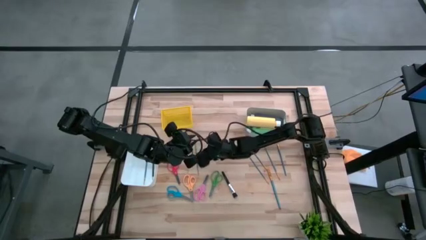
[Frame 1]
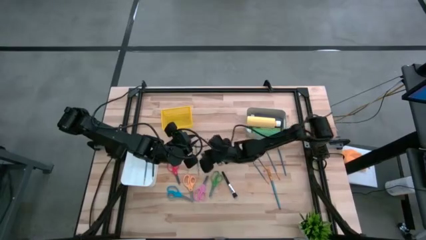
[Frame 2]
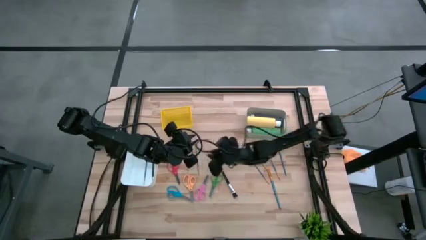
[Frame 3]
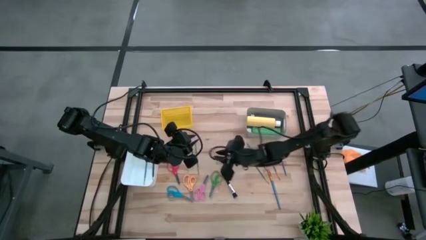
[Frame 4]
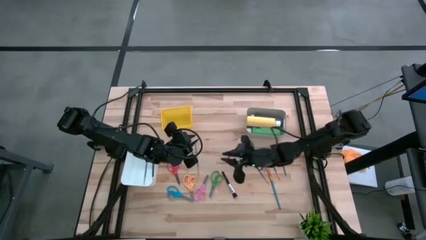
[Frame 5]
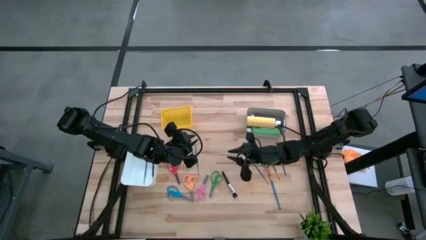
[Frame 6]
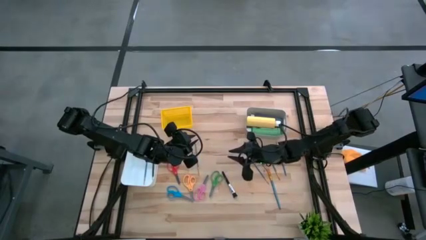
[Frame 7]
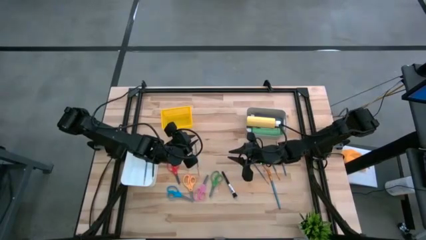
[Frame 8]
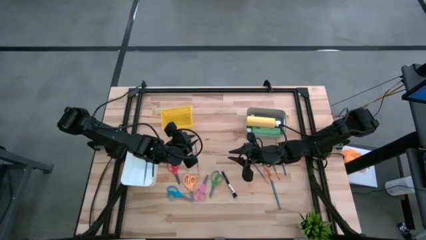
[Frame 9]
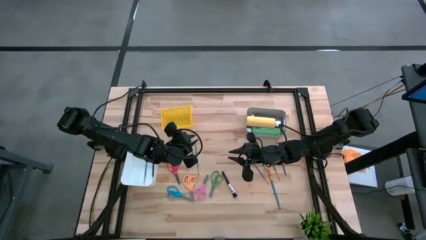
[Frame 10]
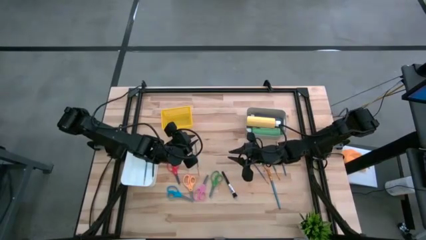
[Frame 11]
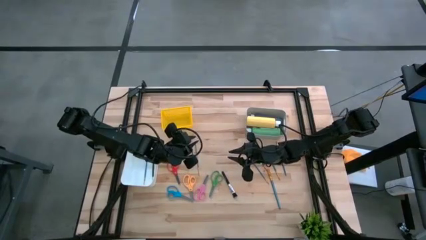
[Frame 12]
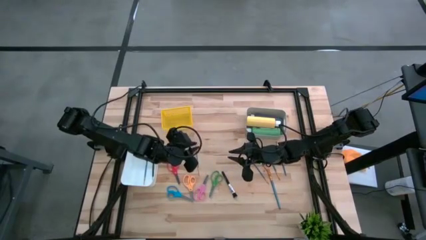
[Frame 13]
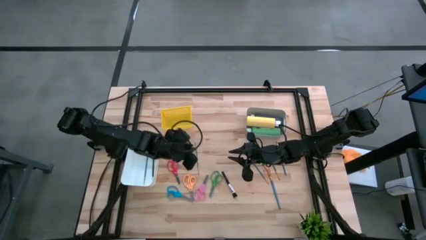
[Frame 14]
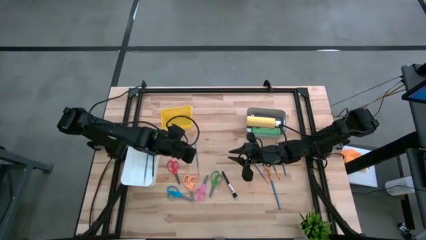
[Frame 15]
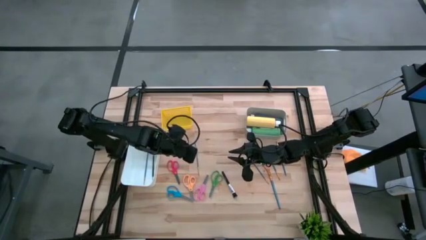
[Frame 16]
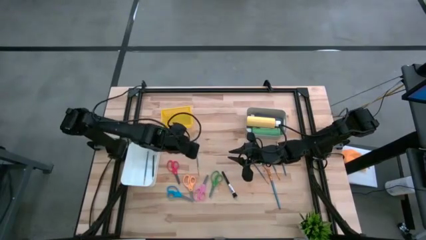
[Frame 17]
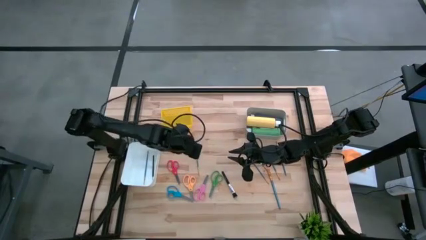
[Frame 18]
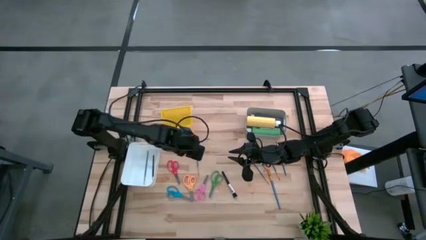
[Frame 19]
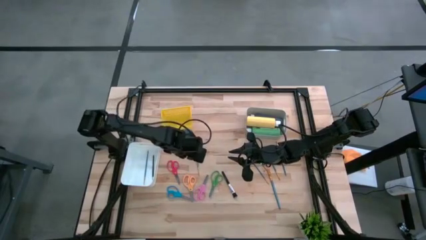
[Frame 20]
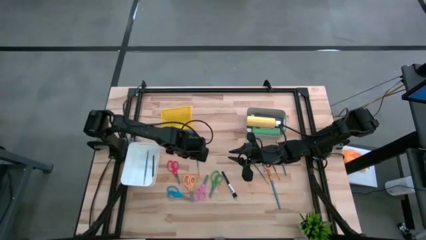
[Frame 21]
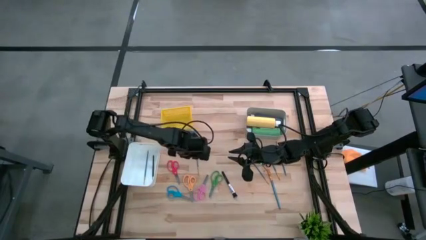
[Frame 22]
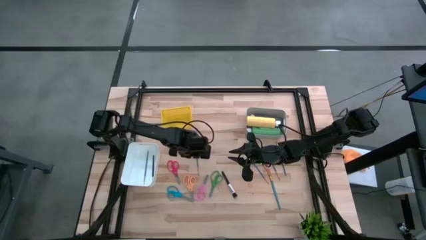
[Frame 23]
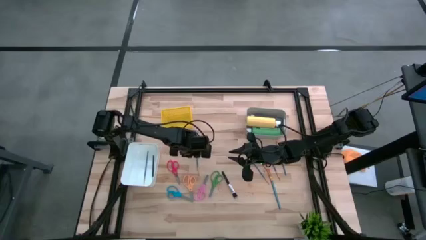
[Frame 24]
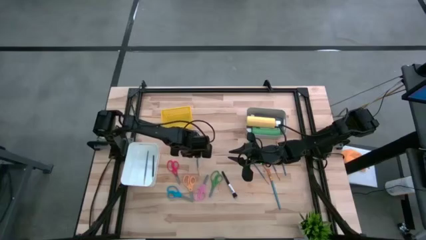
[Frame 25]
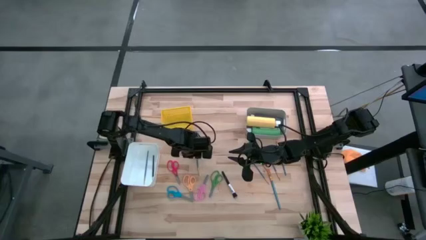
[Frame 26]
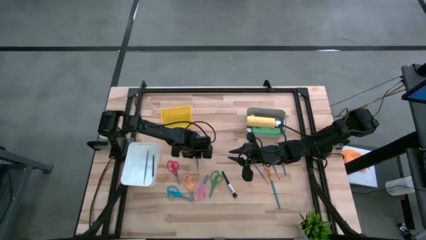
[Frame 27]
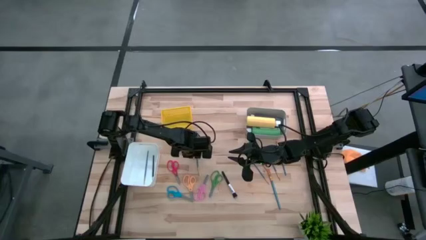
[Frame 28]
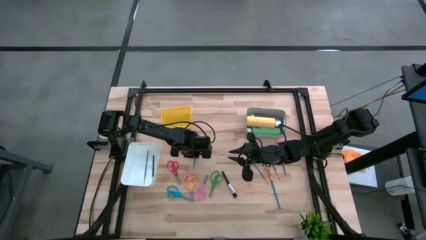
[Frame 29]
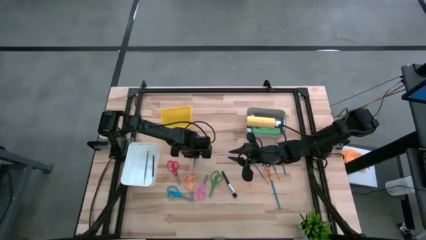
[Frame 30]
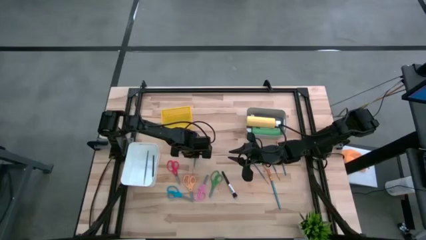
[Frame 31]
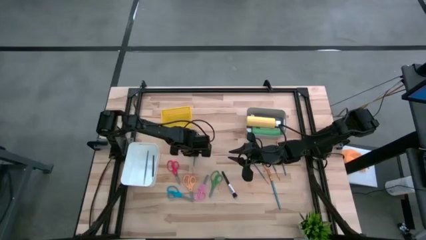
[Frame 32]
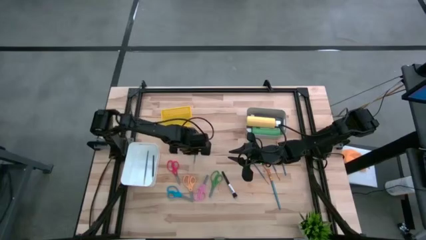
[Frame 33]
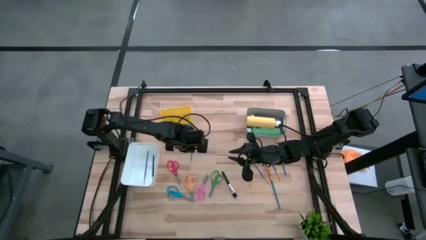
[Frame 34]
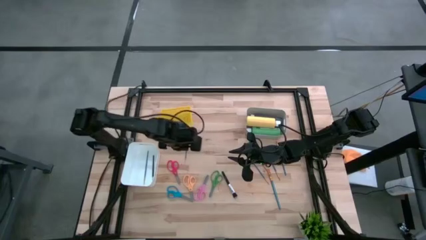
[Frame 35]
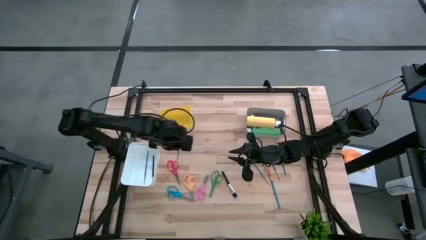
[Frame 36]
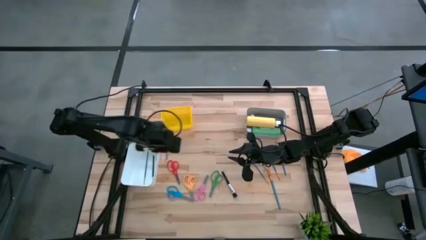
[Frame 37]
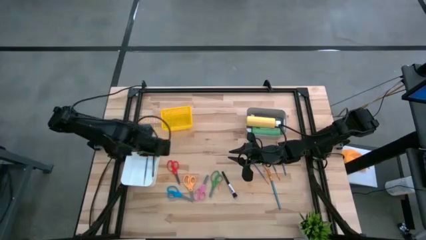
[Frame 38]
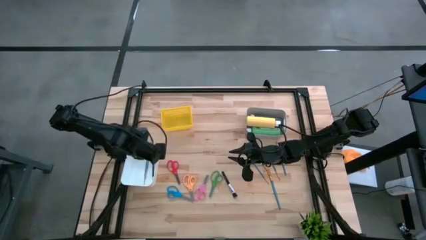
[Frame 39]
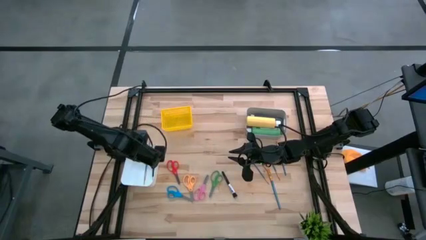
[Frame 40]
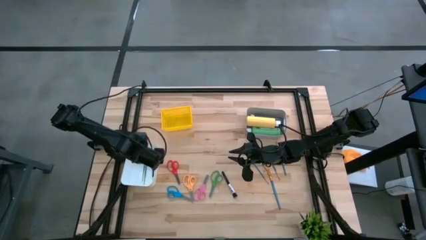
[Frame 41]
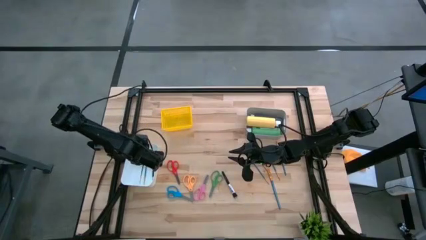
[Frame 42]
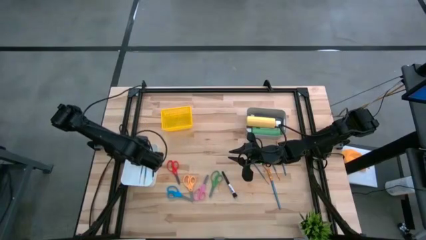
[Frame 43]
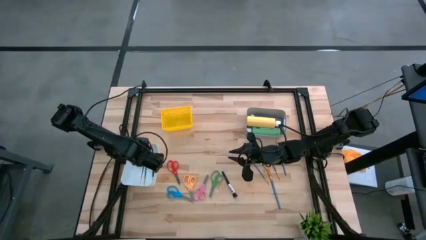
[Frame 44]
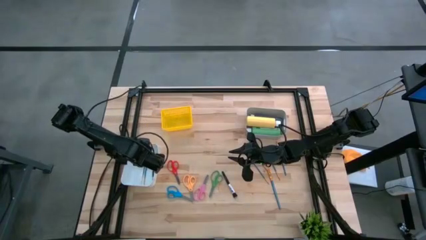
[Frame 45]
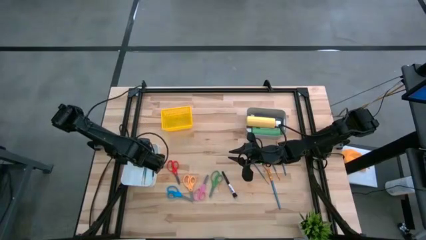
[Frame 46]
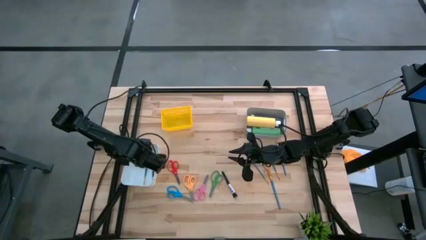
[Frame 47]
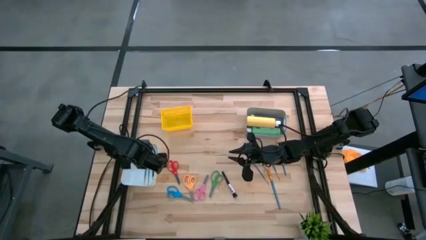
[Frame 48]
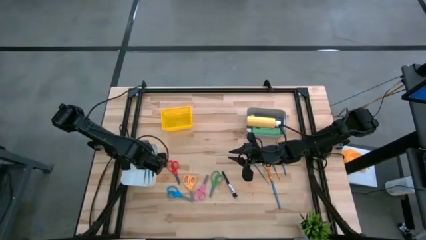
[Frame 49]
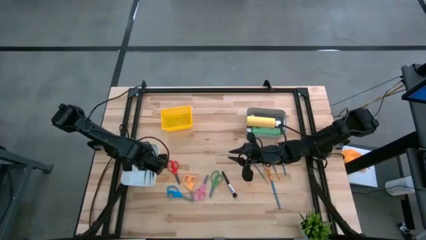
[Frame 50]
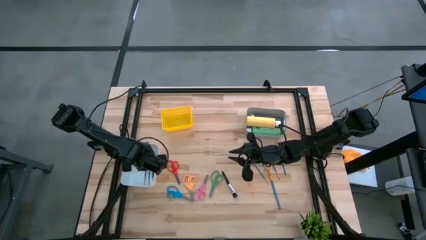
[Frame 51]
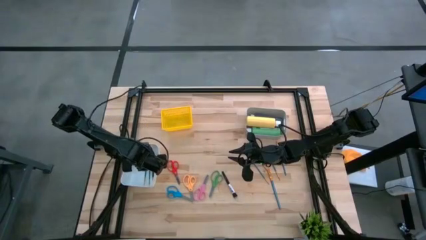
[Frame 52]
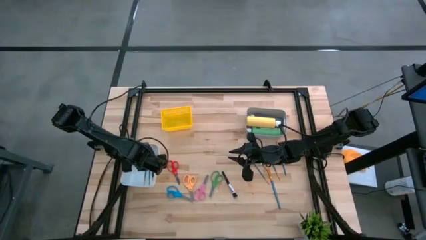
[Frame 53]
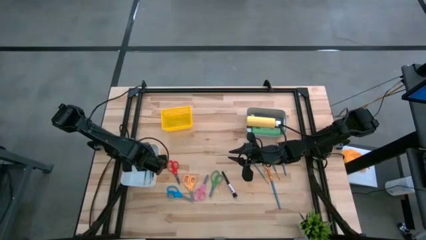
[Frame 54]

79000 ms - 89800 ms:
Task: Pick & Place Paint Supplies
Put the blue paintbrush into the white bin
